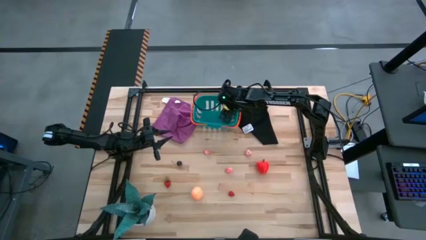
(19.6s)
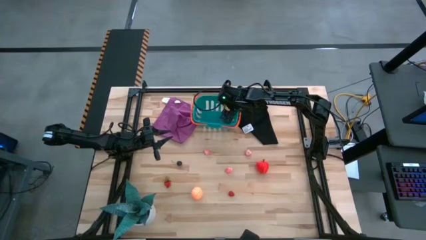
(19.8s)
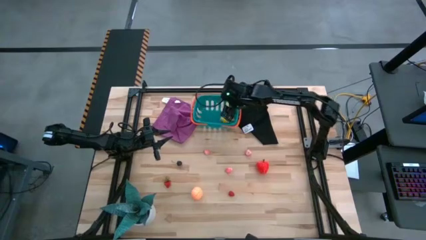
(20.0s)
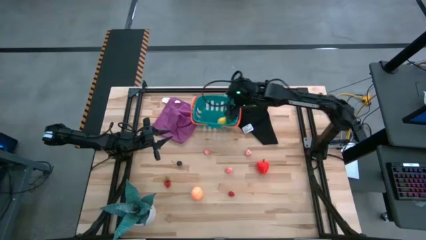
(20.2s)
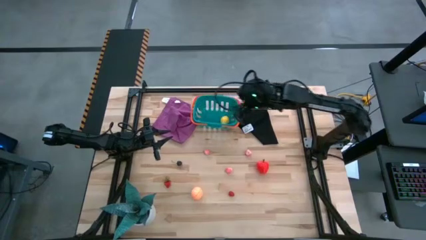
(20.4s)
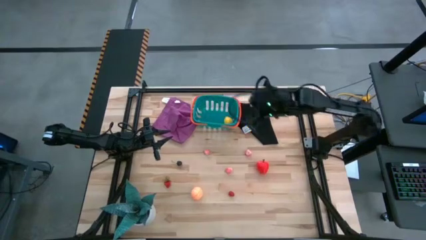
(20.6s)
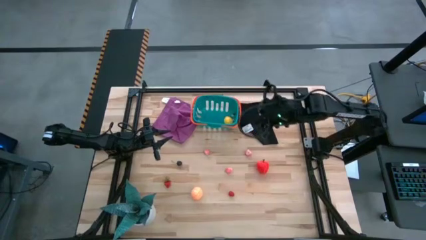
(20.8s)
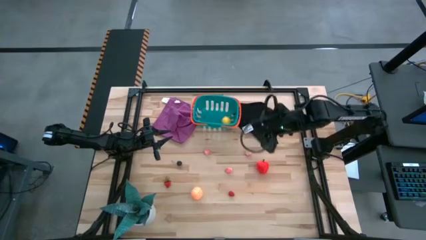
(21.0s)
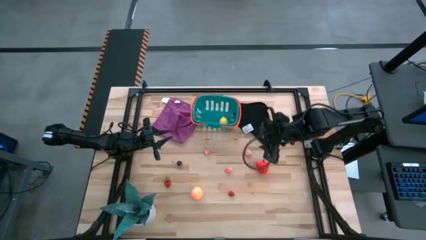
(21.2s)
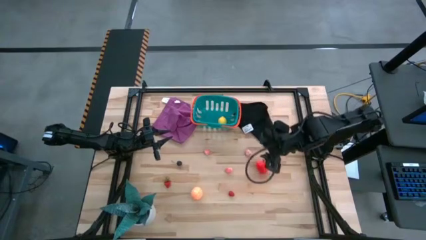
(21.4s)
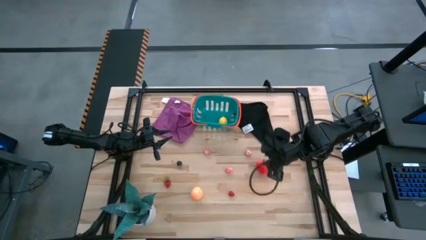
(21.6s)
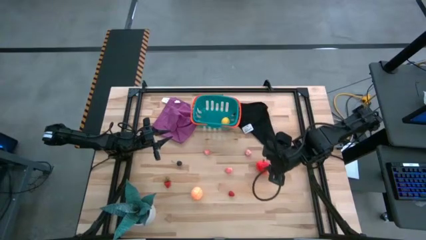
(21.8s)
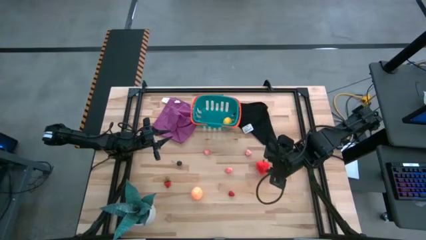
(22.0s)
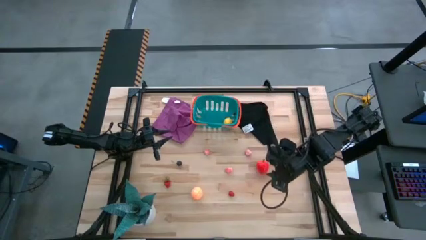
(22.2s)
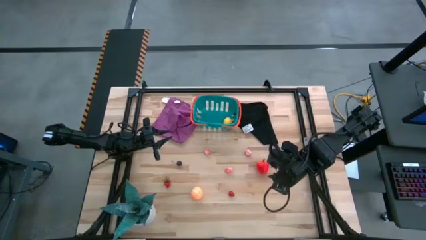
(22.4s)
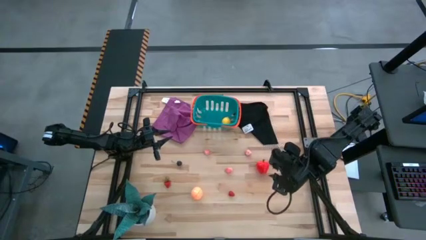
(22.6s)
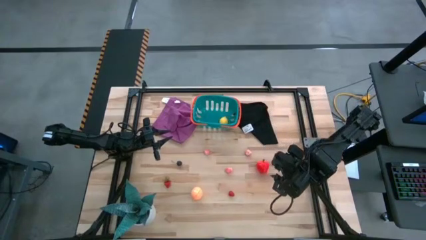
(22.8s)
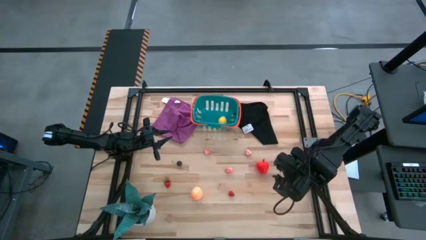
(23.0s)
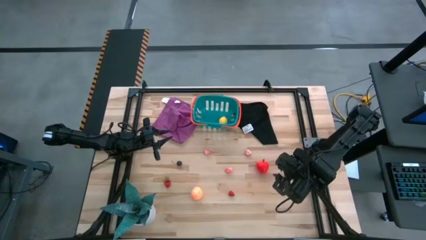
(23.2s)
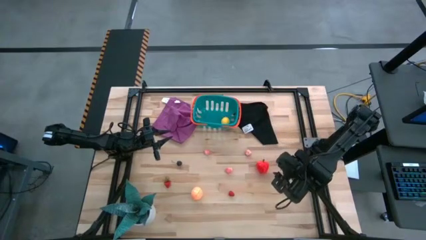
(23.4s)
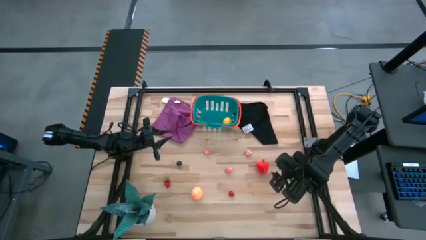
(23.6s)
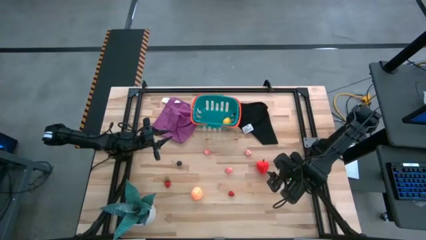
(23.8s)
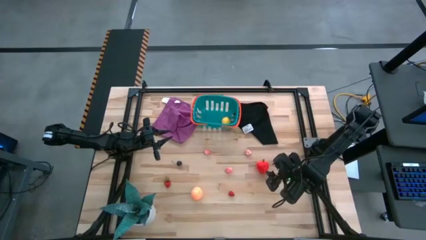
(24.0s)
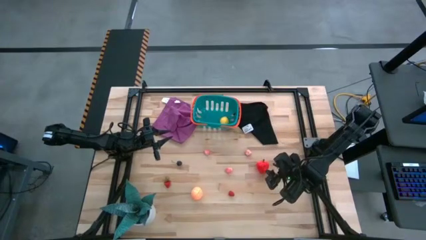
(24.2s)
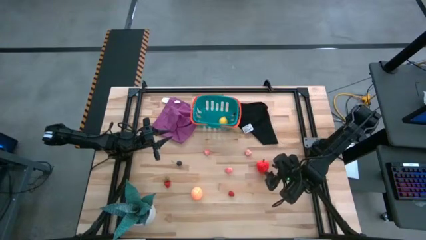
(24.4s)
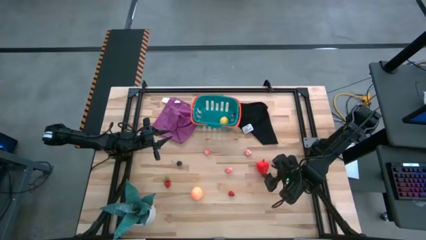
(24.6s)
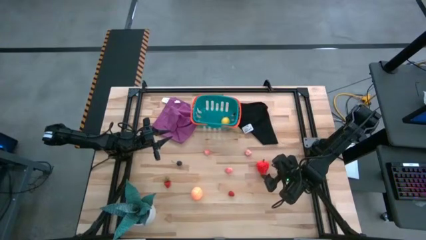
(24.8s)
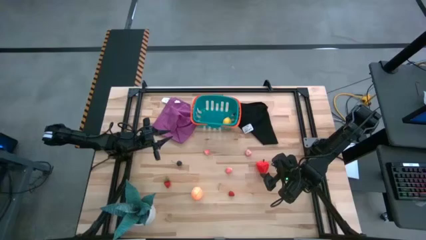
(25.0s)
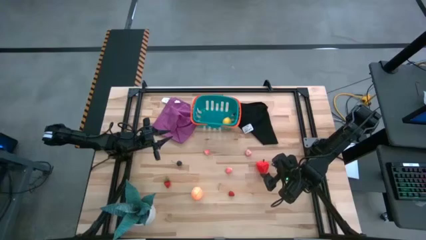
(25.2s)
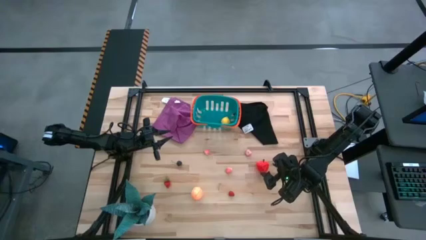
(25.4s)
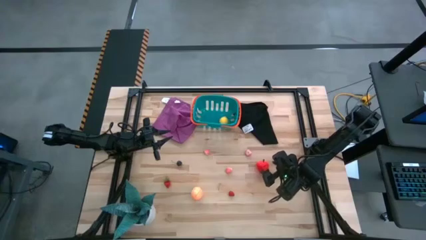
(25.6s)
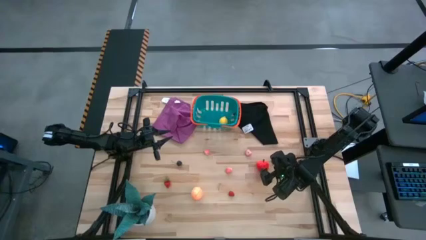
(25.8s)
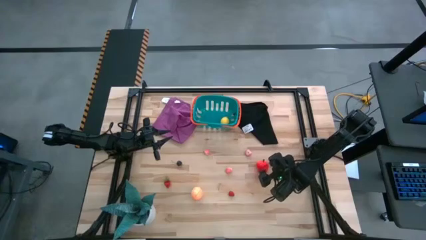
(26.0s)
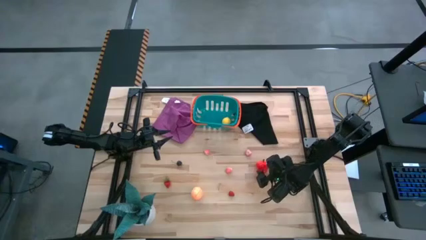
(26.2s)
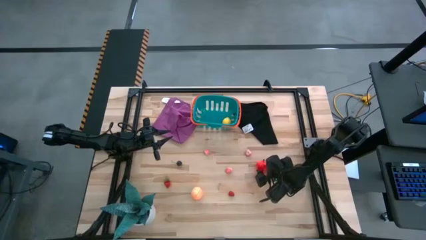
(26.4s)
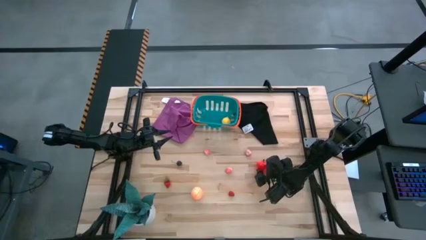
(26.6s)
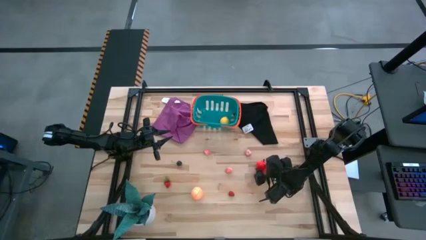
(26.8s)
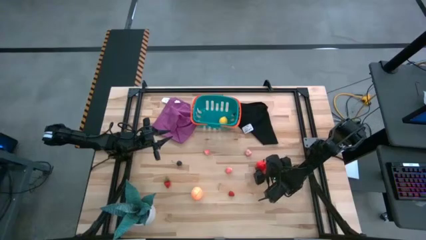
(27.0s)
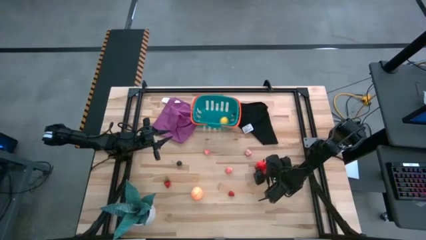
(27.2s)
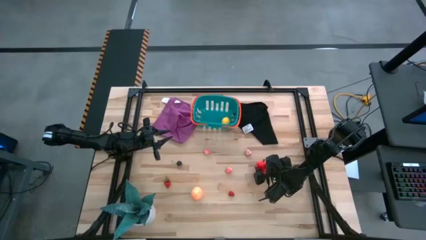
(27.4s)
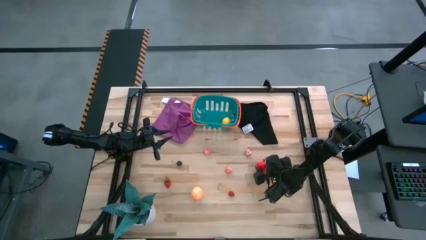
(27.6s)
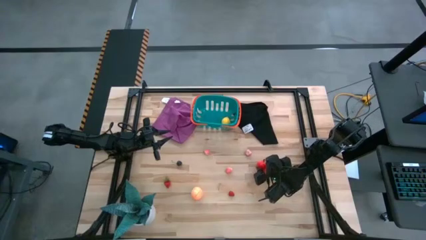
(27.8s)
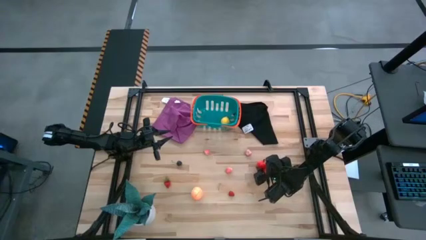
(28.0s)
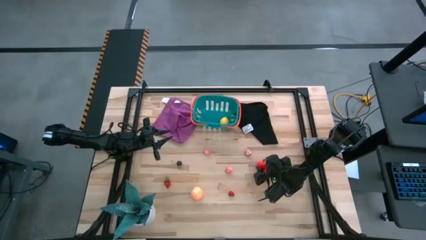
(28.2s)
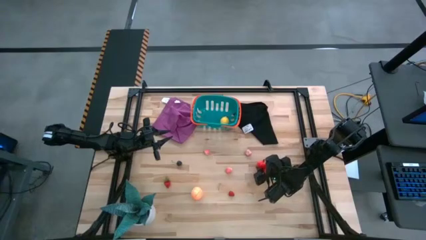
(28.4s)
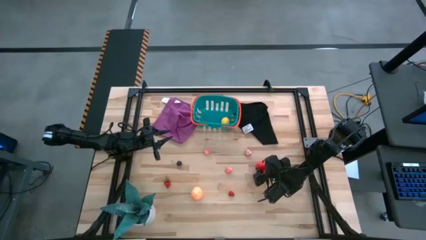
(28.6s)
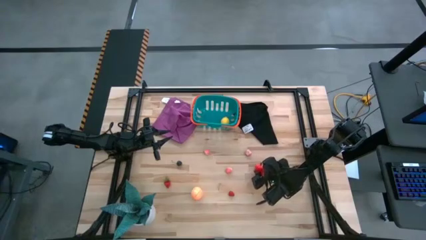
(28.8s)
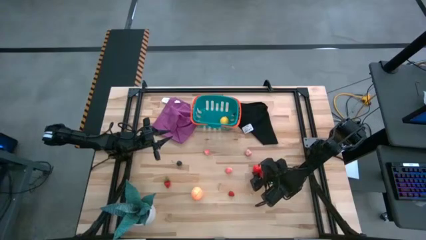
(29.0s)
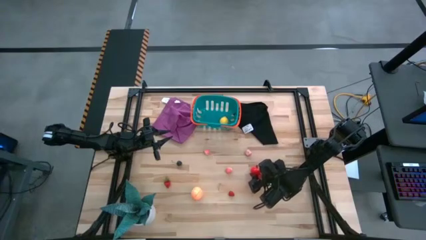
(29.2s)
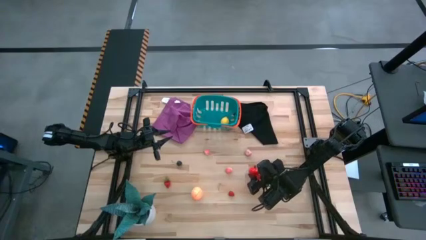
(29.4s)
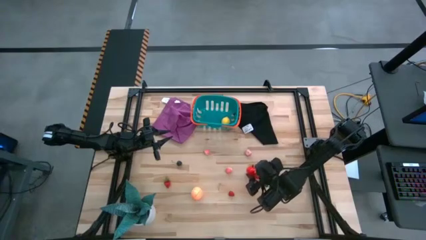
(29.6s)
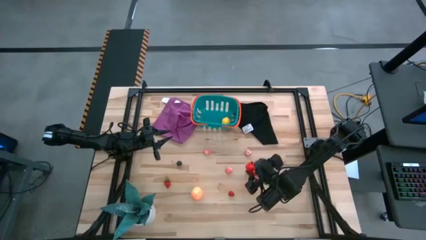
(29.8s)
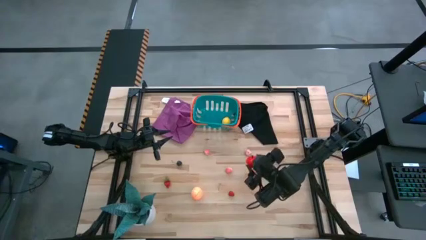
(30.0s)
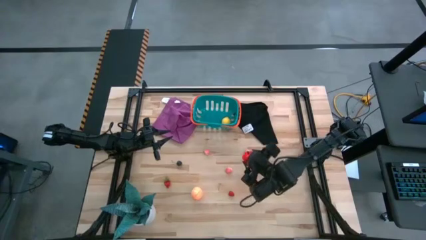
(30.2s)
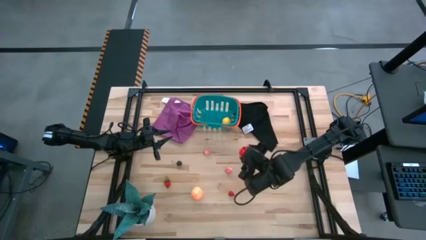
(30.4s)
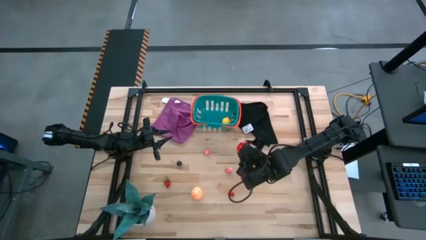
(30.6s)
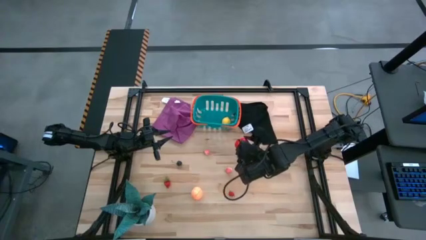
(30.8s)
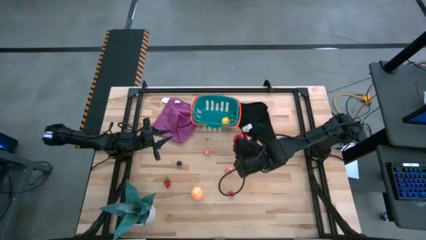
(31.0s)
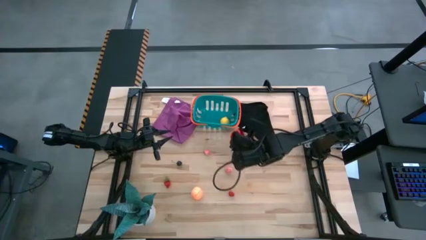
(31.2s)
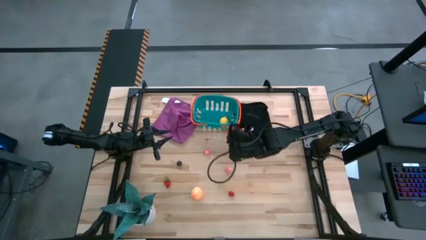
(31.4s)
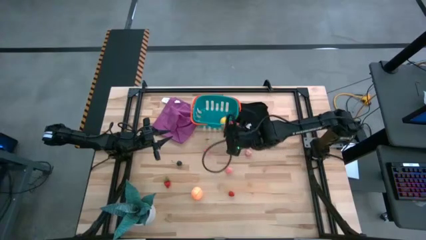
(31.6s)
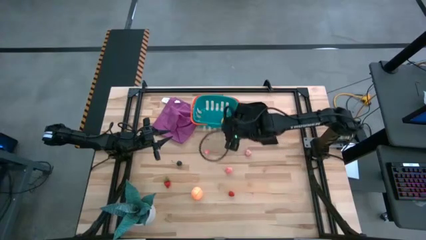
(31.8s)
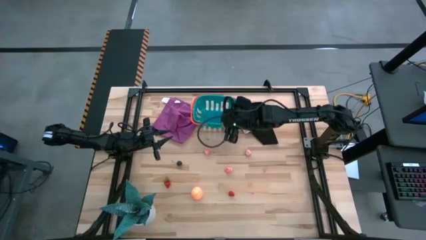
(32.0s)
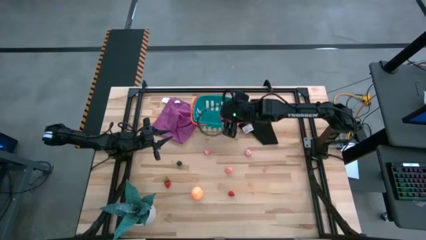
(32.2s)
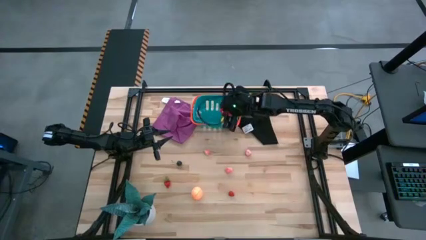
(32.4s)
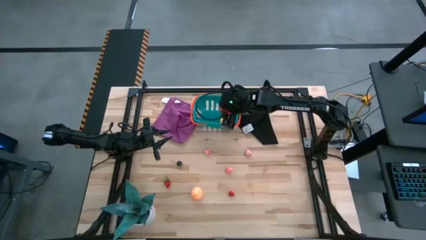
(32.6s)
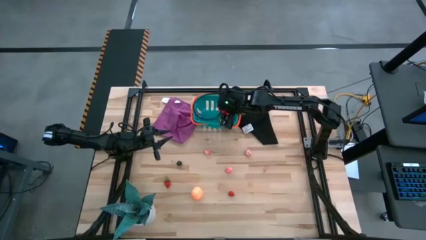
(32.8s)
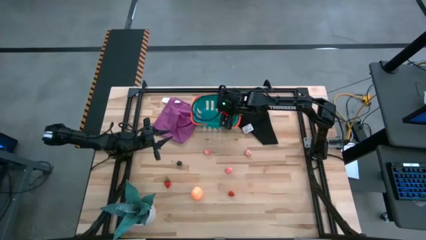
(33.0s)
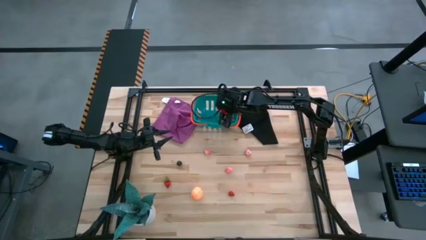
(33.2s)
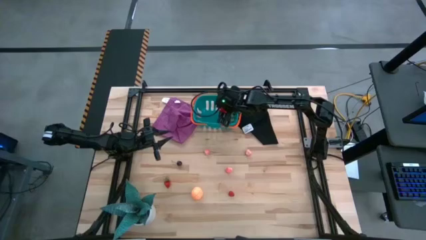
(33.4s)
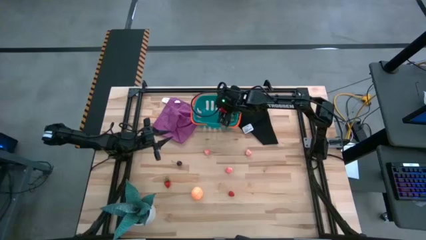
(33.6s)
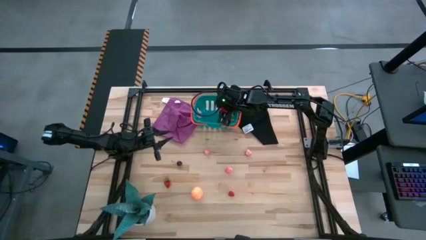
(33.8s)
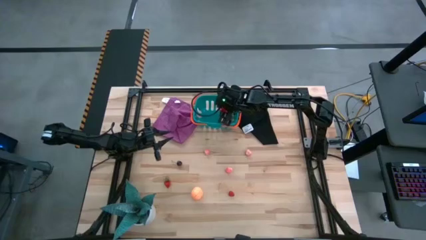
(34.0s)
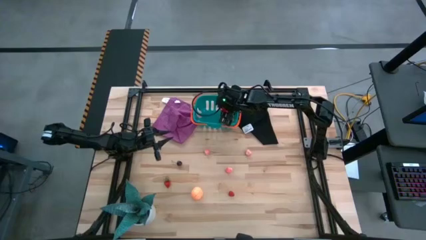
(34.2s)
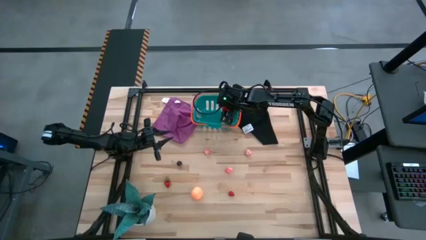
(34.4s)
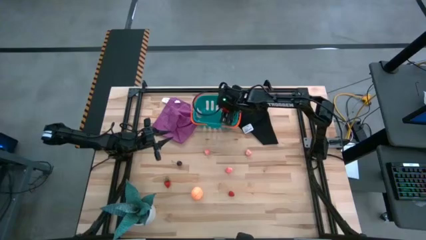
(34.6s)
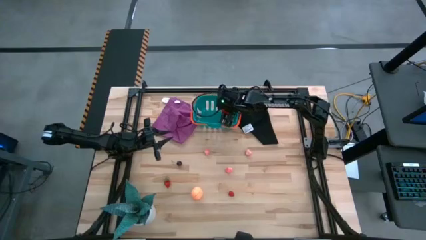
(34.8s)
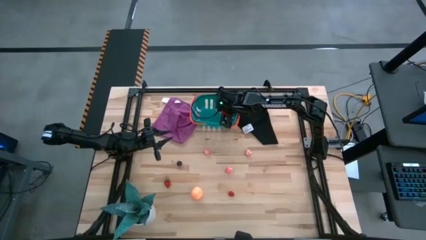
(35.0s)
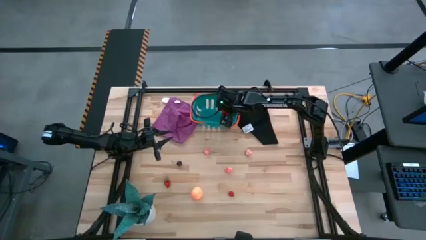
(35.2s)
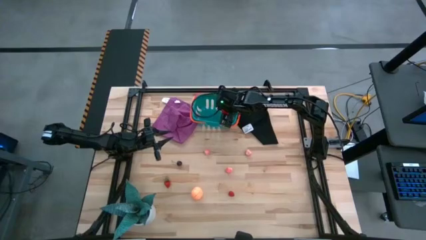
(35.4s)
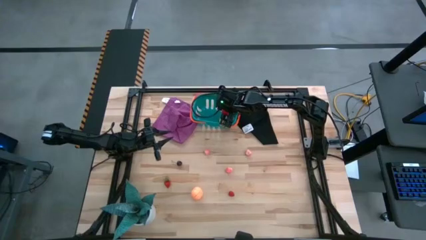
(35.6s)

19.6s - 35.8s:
Task: Pick and placing Produce into tupperware
Put the red apple into the blue bin
